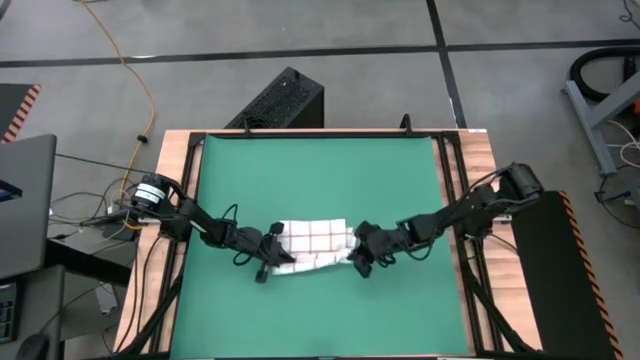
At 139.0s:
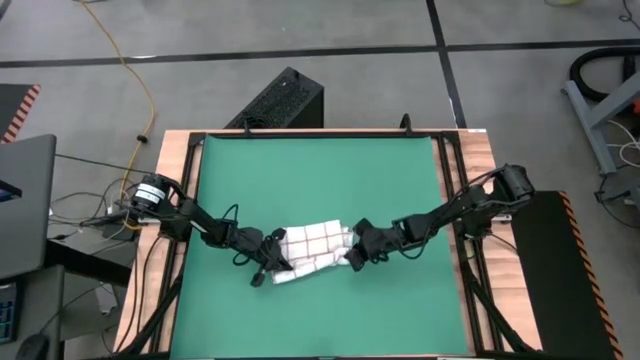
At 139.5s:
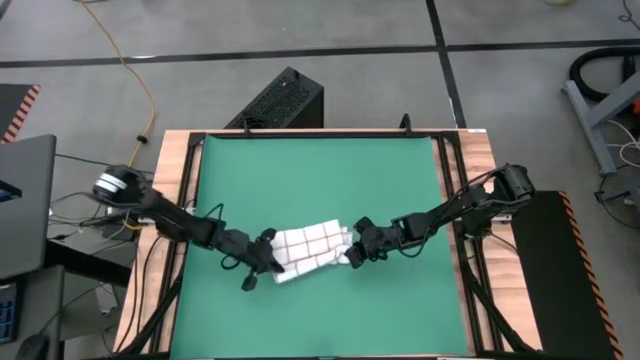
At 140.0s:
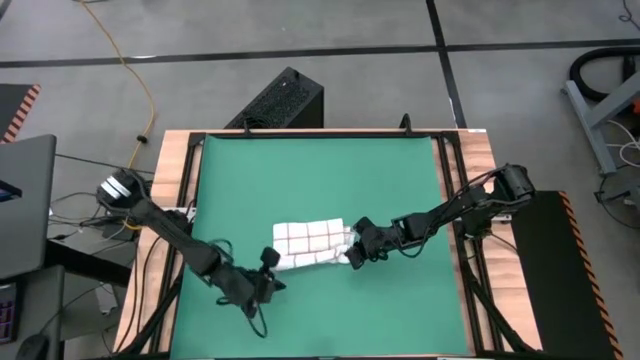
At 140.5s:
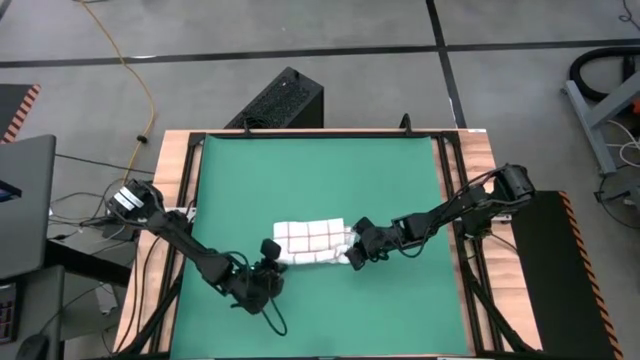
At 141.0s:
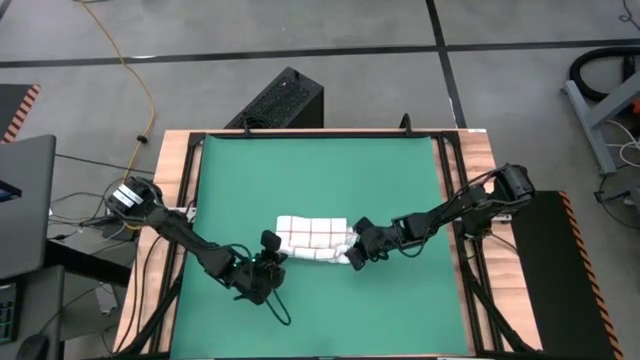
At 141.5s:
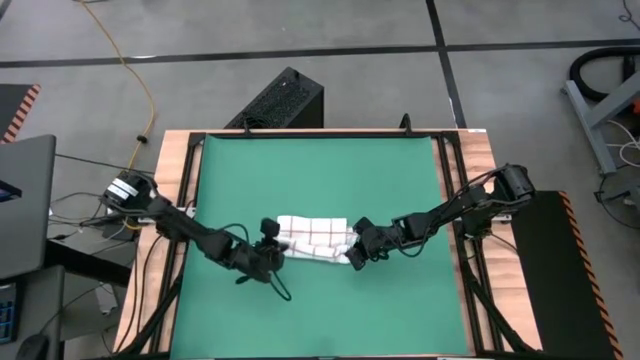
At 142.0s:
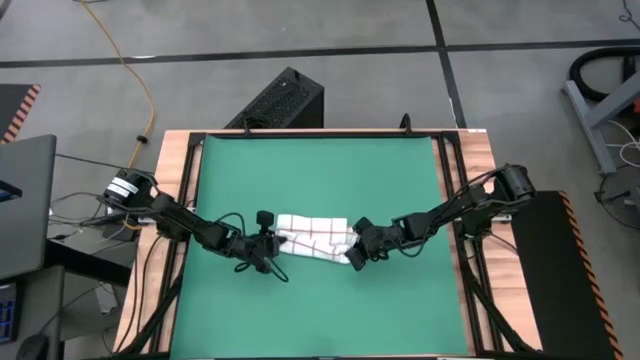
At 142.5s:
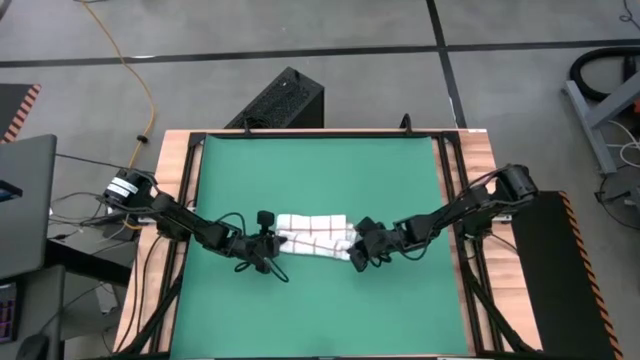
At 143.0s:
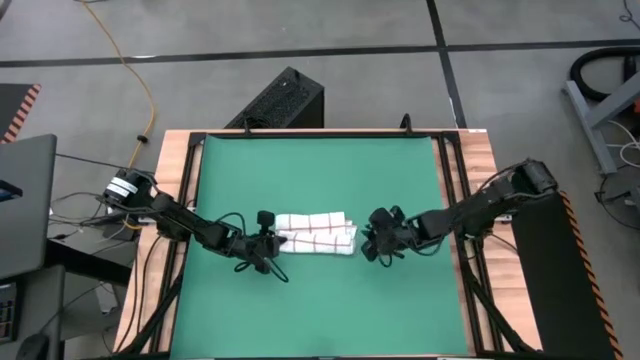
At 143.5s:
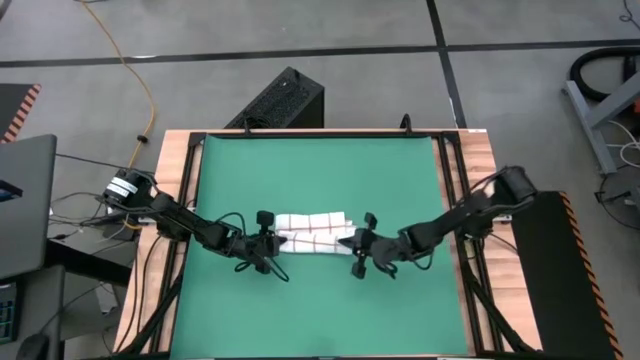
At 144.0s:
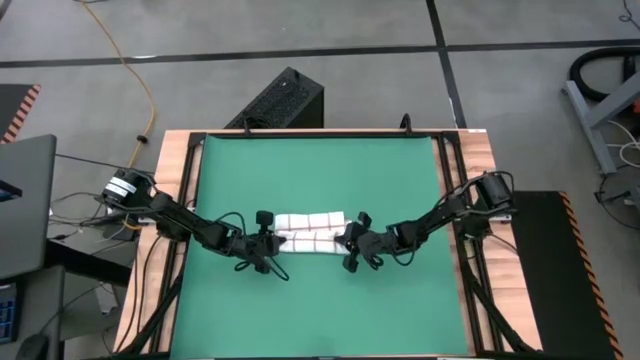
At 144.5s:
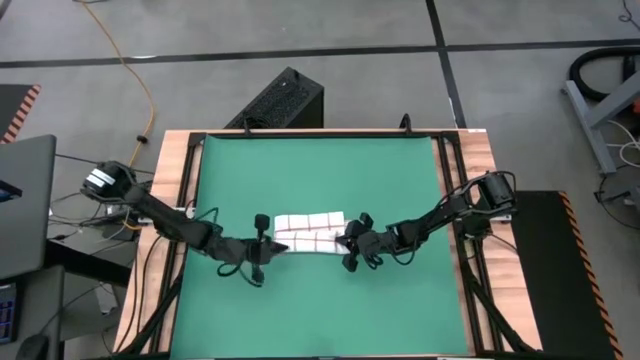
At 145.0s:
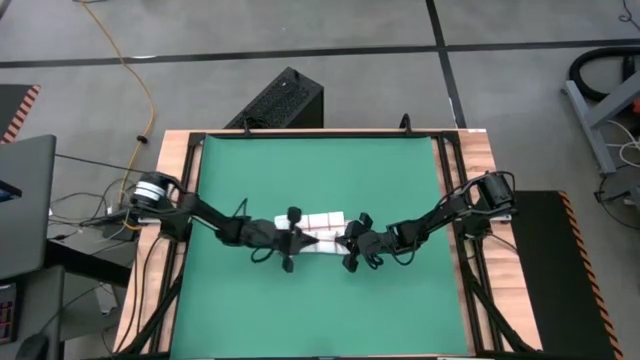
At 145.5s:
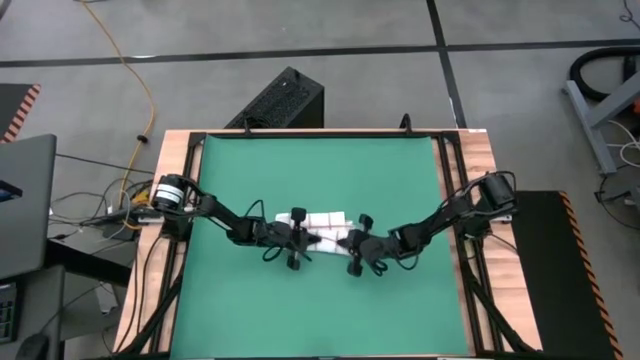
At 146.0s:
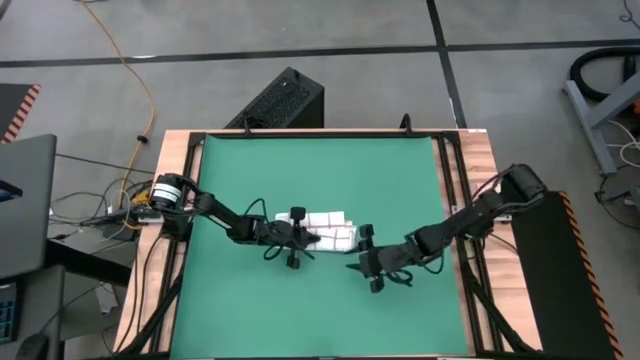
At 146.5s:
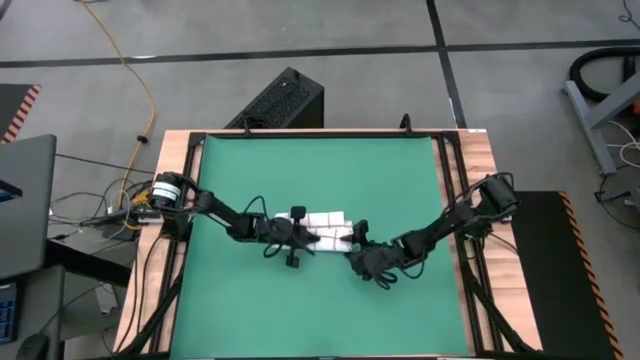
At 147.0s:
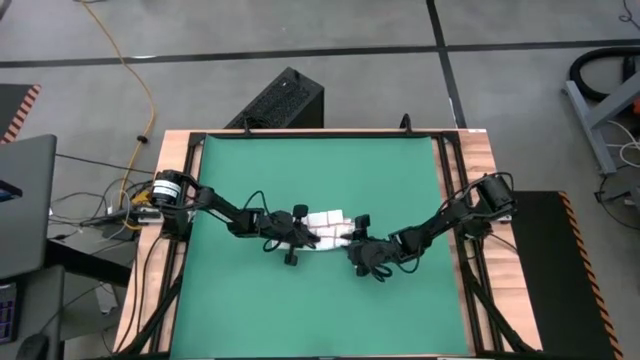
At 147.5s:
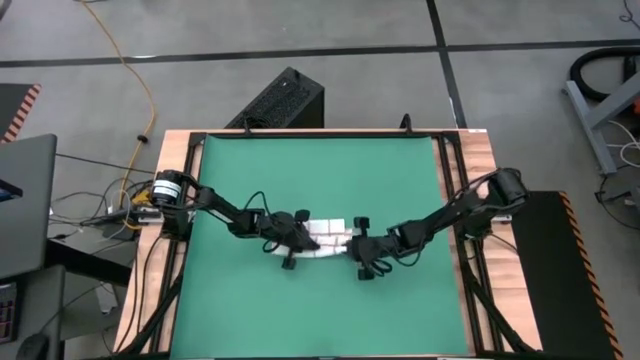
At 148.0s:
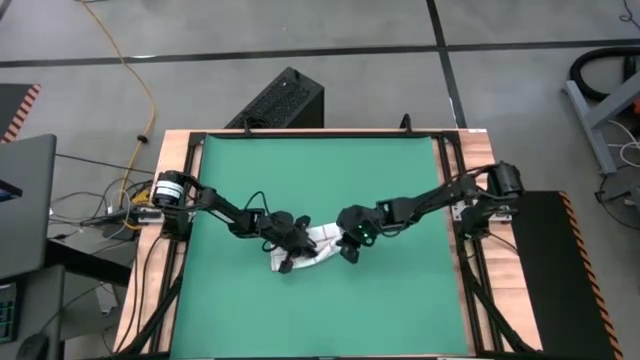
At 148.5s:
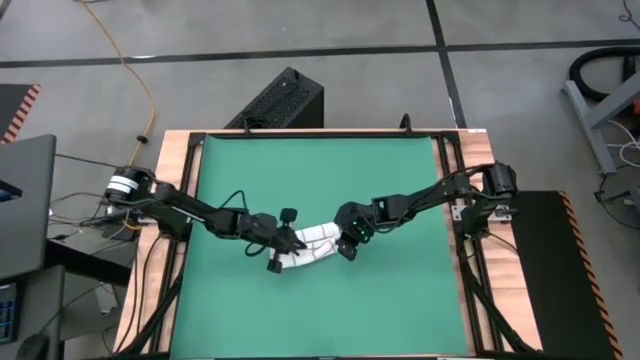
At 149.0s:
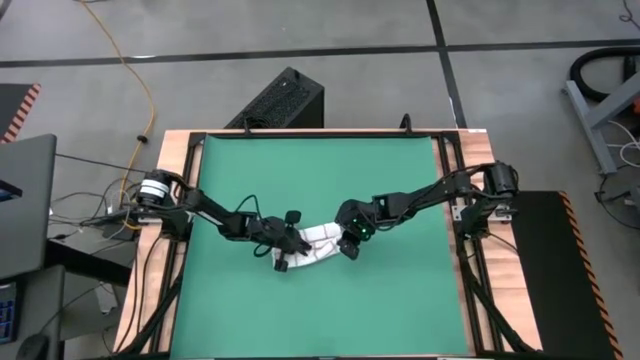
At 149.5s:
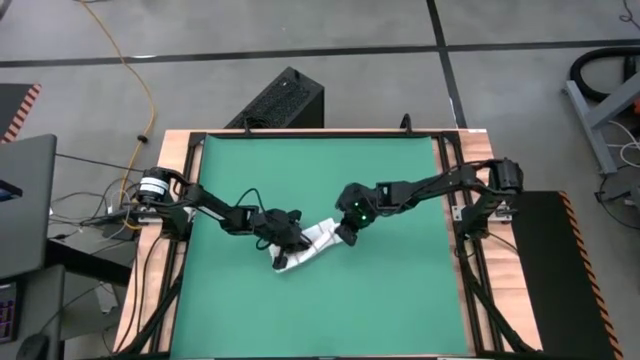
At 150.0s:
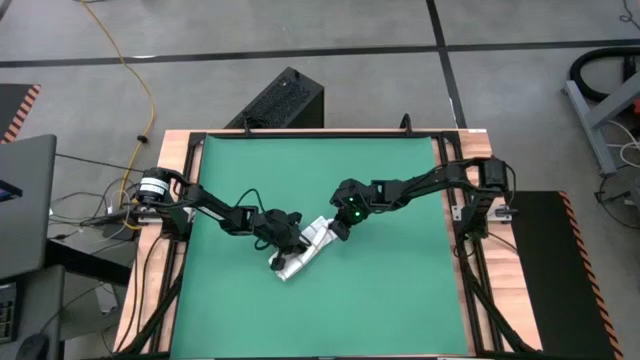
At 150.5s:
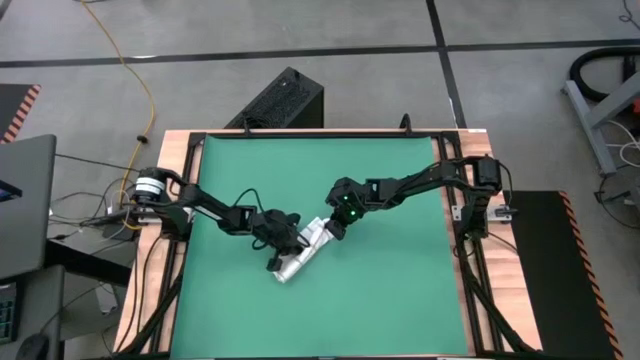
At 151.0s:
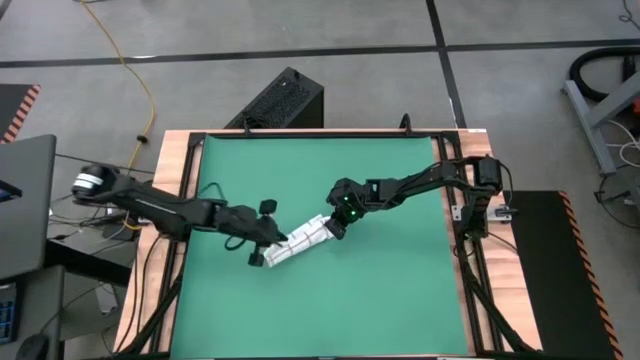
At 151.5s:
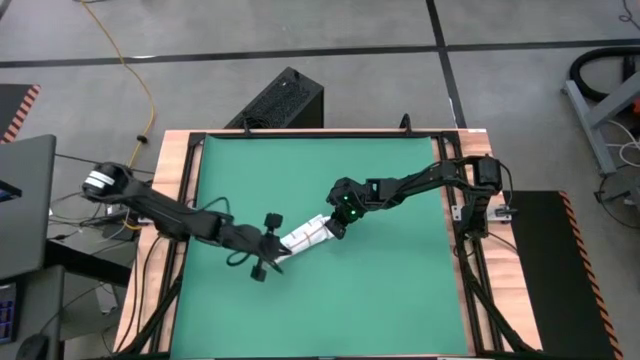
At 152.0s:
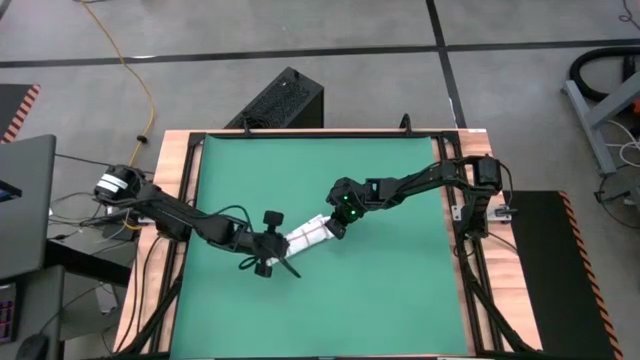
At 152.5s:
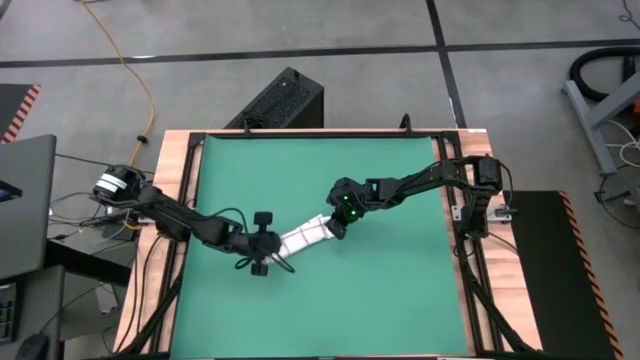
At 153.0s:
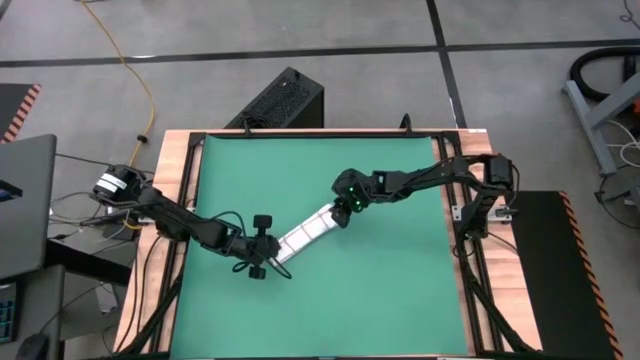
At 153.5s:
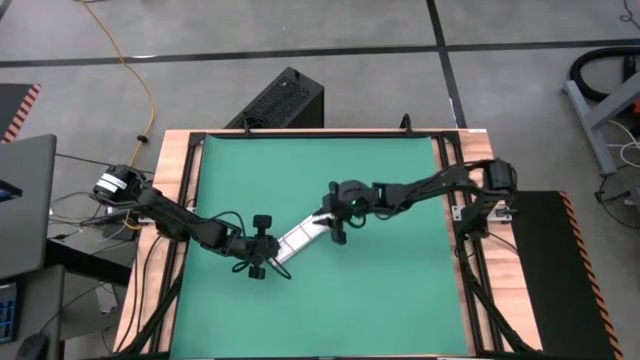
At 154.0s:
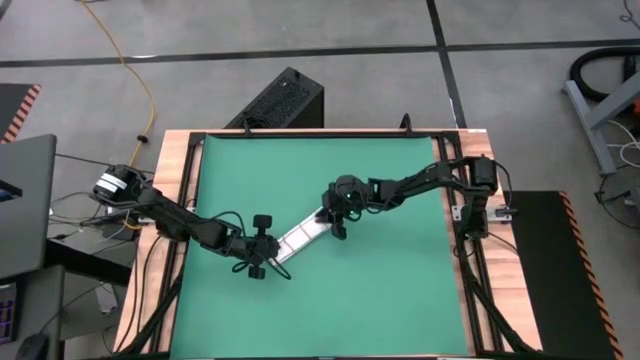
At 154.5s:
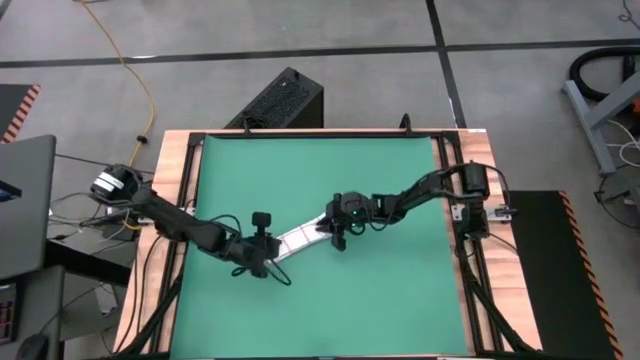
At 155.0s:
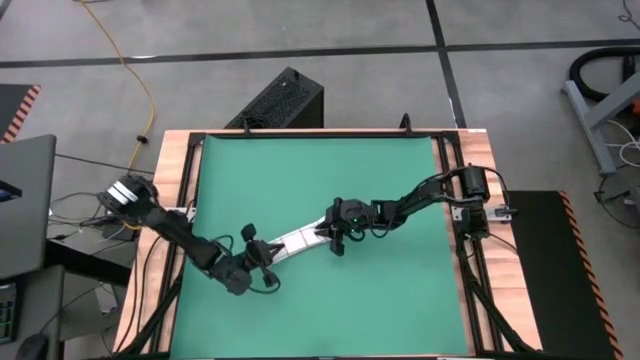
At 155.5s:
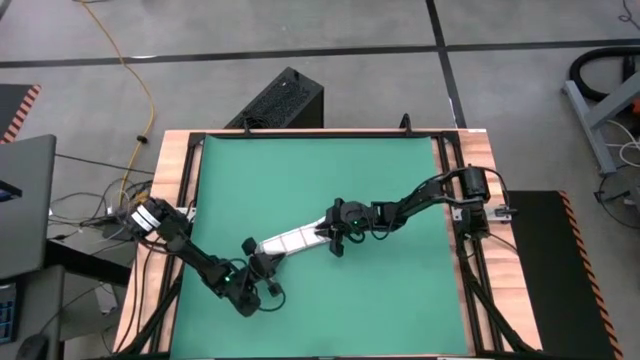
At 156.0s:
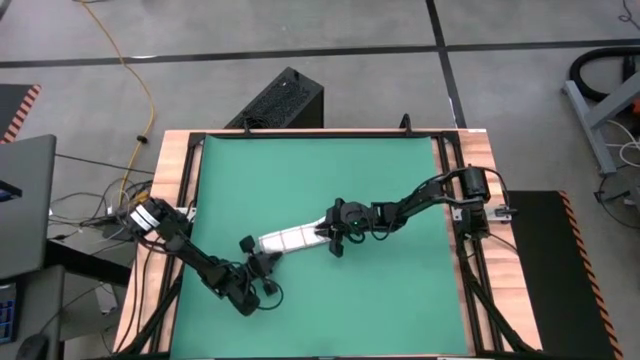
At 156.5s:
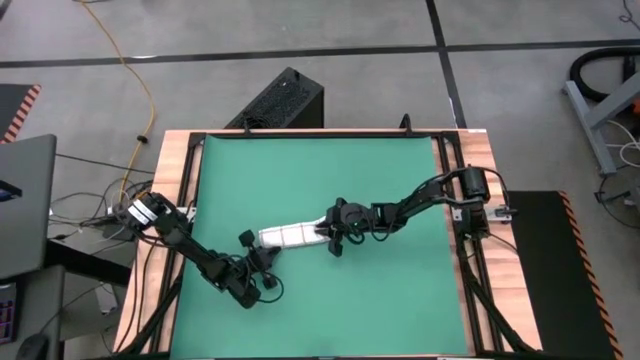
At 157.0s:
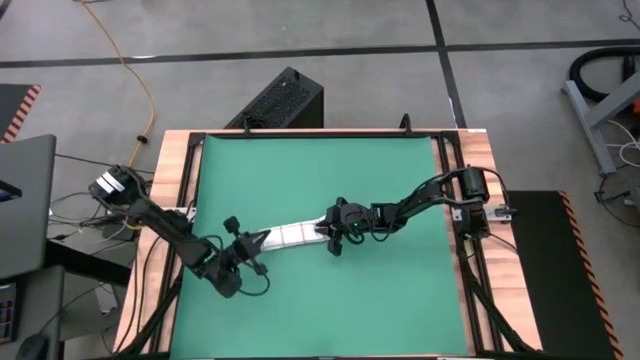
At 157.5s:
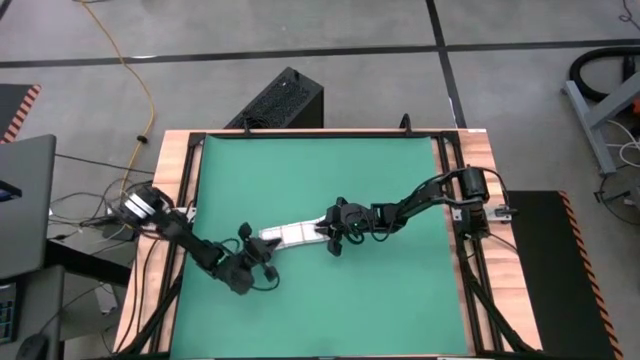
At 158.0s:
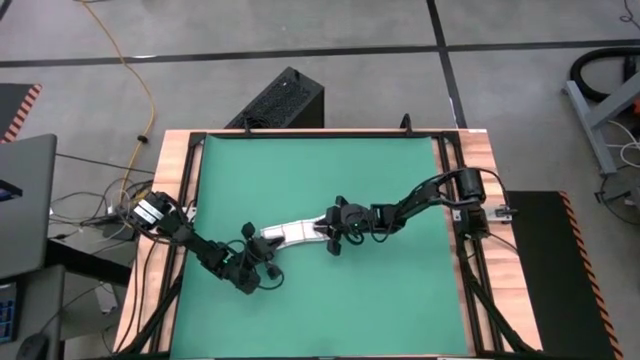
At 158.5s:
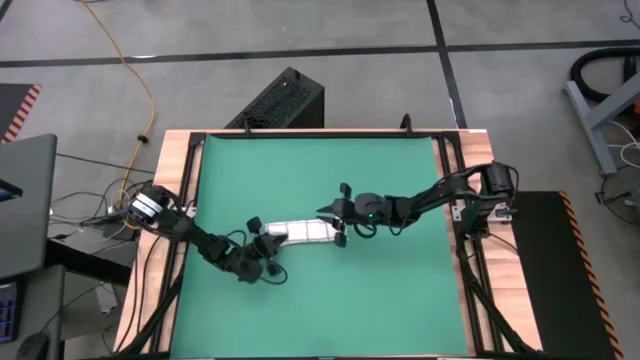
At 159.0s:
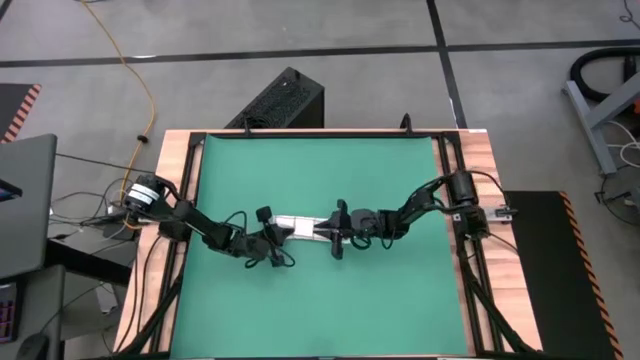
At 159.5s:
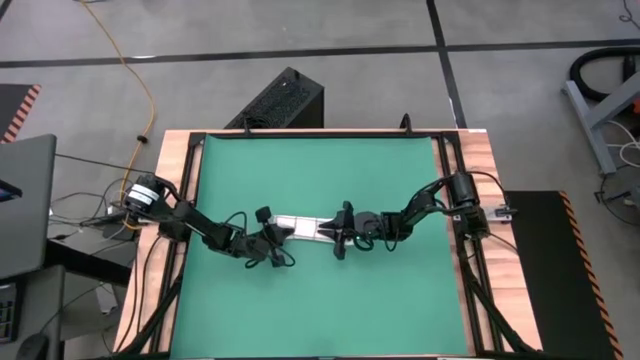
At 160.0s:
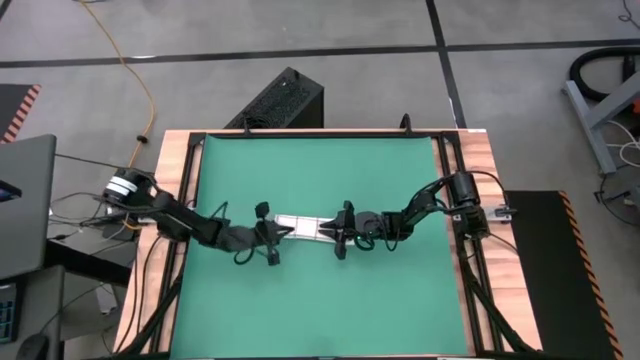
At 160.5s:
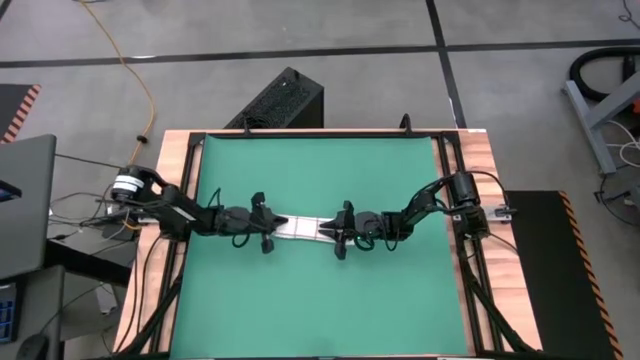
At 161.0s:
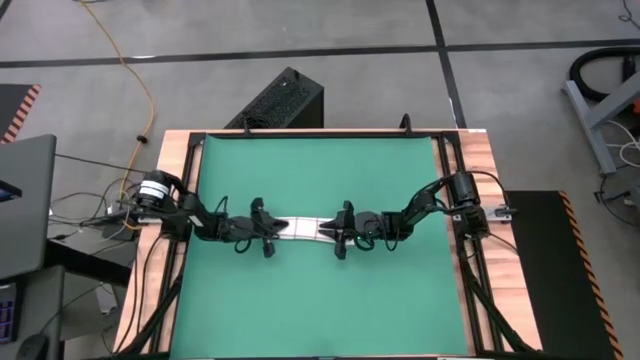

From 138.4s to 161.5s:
Task: Roll towel into tight, uniform cylinder
Roll the white towel
